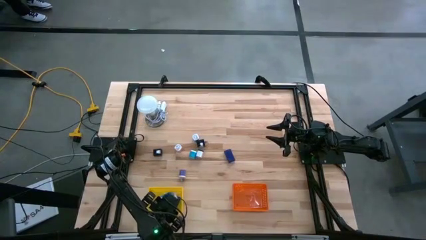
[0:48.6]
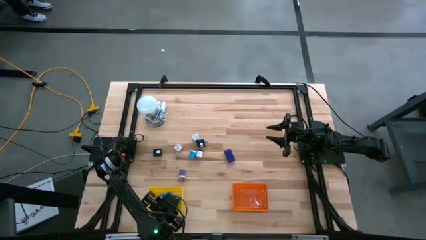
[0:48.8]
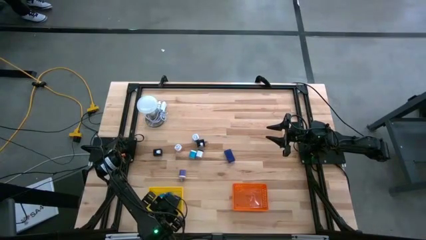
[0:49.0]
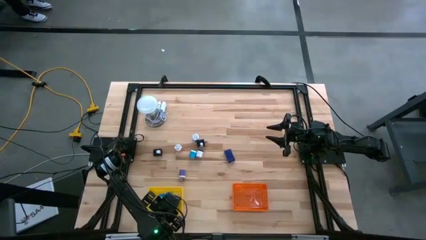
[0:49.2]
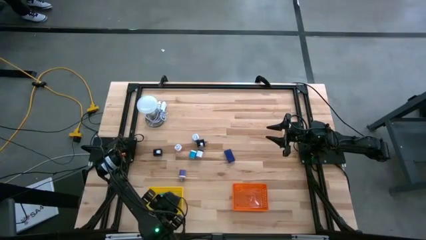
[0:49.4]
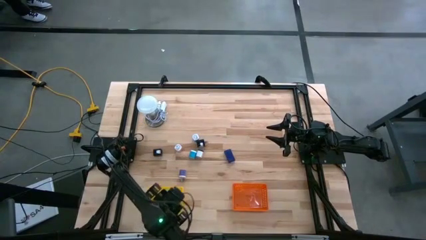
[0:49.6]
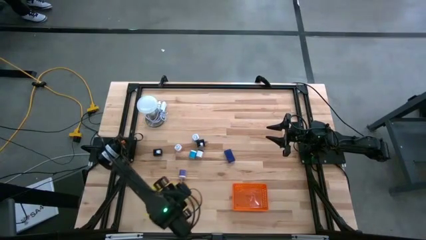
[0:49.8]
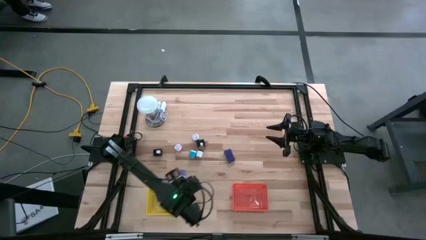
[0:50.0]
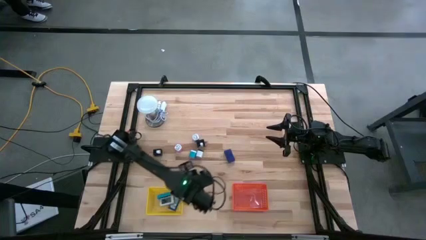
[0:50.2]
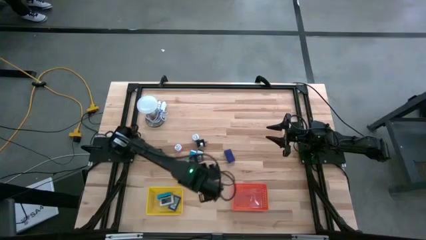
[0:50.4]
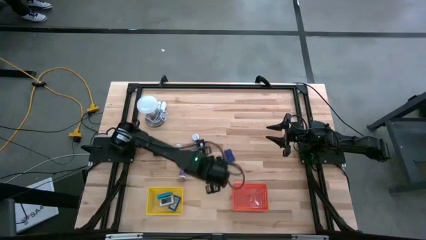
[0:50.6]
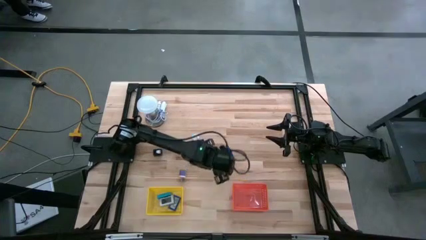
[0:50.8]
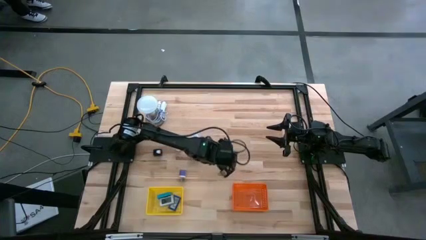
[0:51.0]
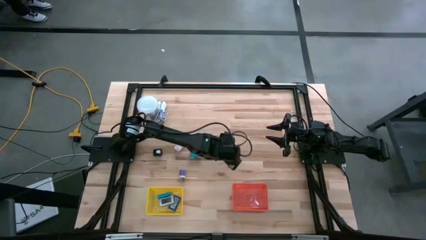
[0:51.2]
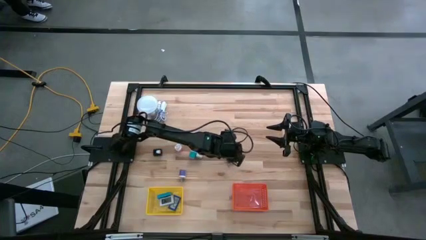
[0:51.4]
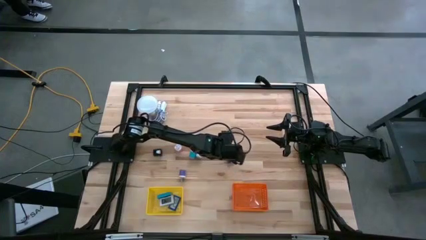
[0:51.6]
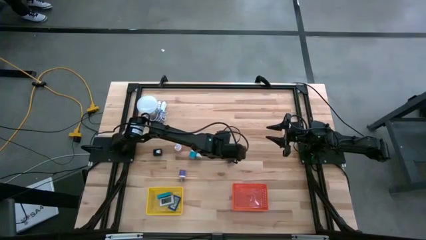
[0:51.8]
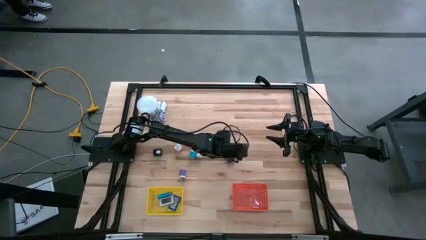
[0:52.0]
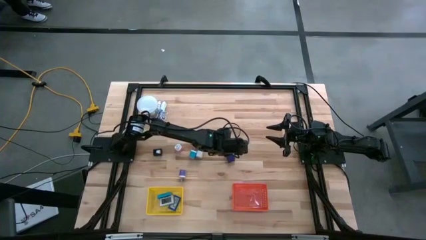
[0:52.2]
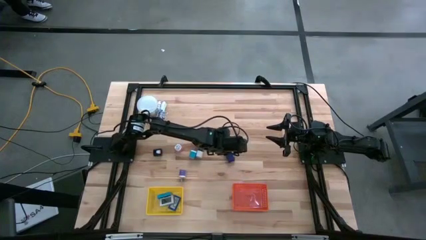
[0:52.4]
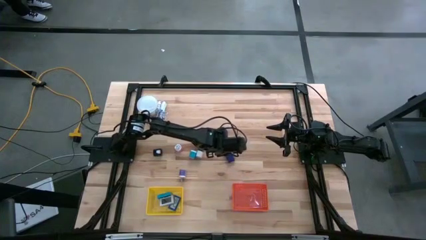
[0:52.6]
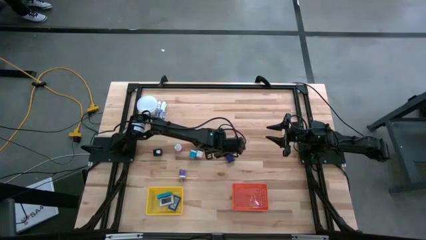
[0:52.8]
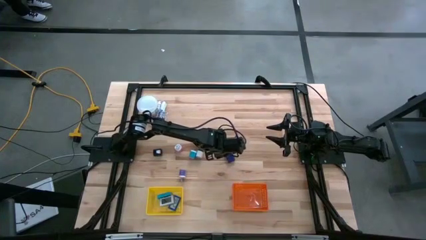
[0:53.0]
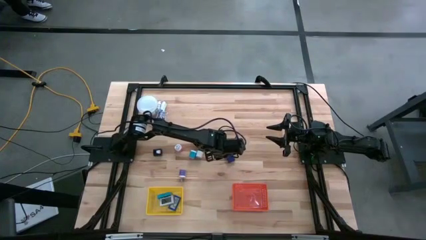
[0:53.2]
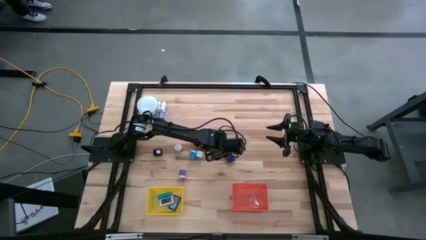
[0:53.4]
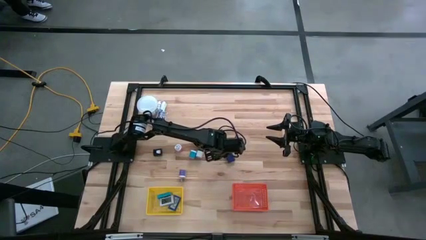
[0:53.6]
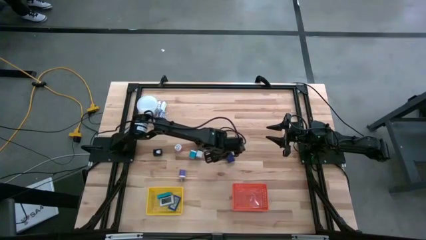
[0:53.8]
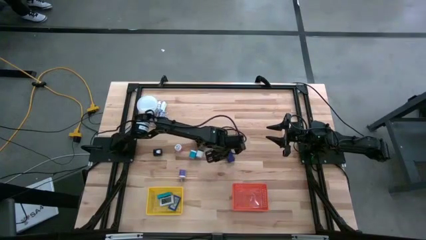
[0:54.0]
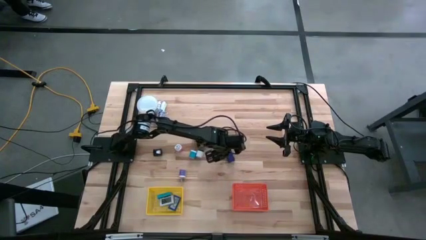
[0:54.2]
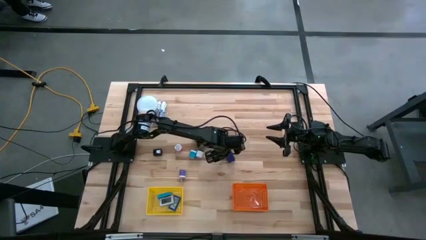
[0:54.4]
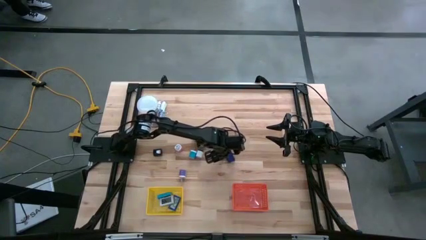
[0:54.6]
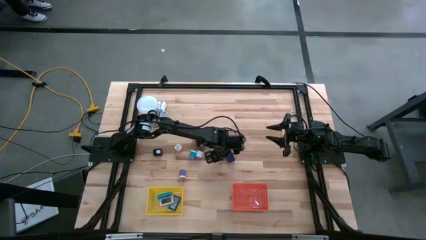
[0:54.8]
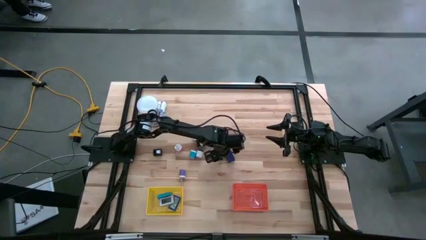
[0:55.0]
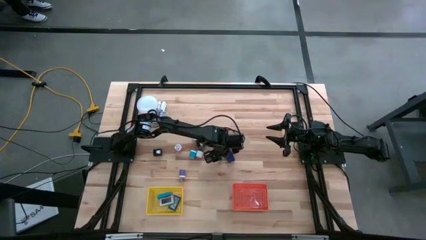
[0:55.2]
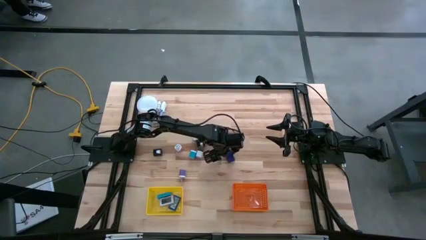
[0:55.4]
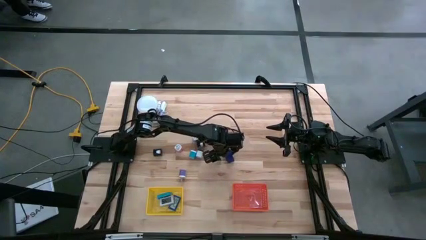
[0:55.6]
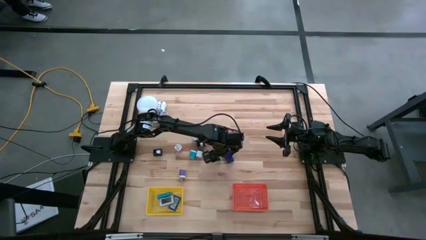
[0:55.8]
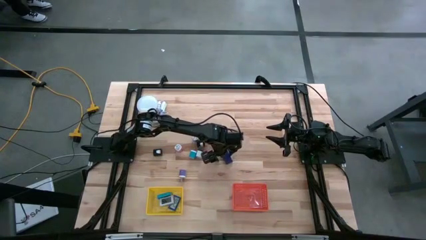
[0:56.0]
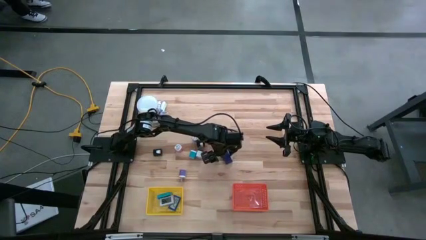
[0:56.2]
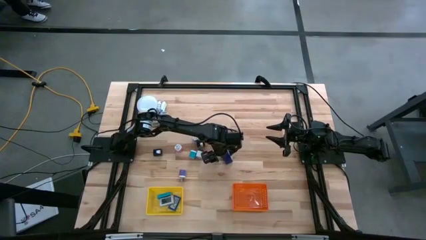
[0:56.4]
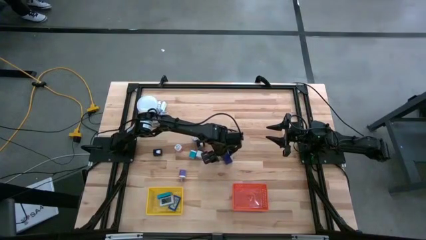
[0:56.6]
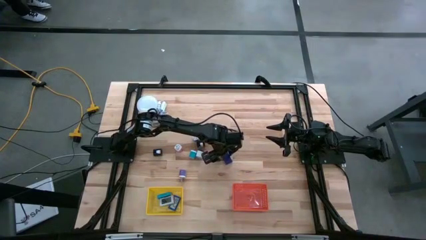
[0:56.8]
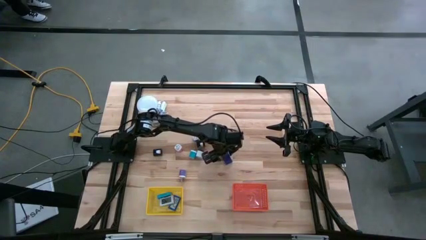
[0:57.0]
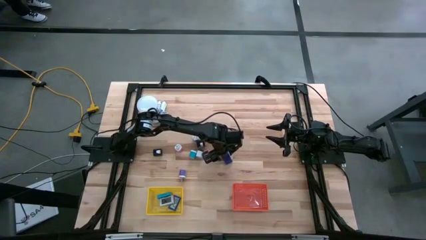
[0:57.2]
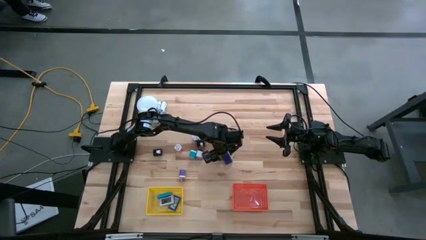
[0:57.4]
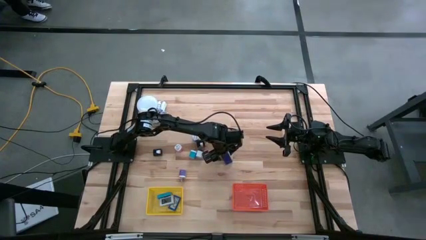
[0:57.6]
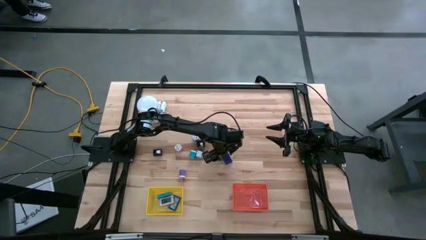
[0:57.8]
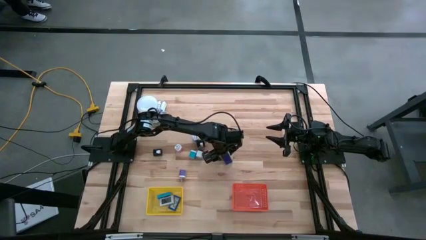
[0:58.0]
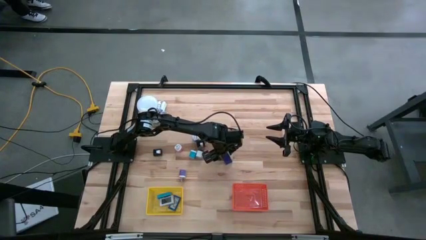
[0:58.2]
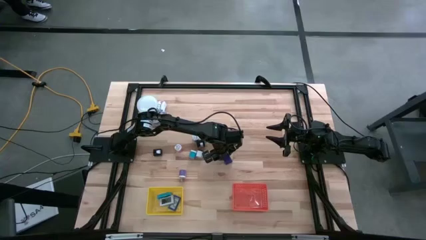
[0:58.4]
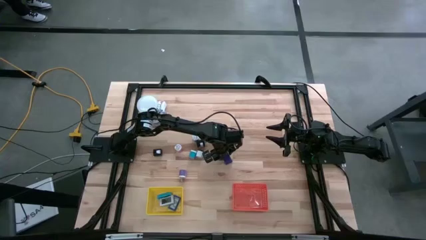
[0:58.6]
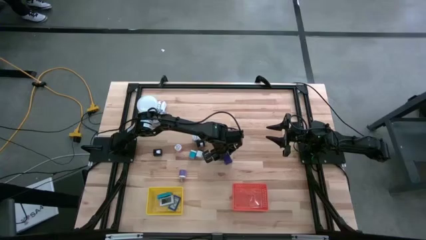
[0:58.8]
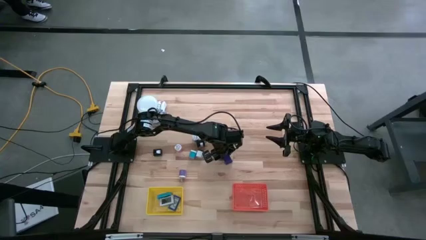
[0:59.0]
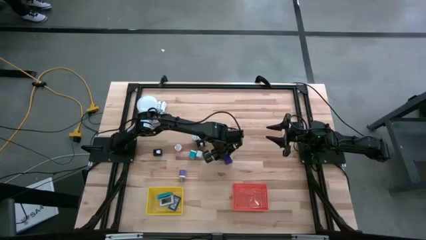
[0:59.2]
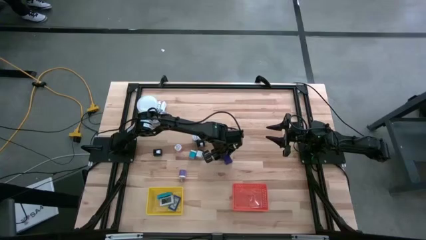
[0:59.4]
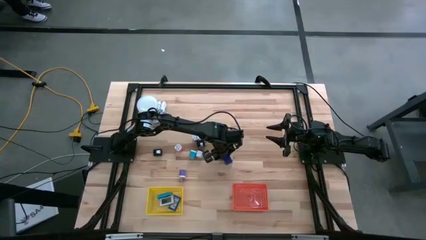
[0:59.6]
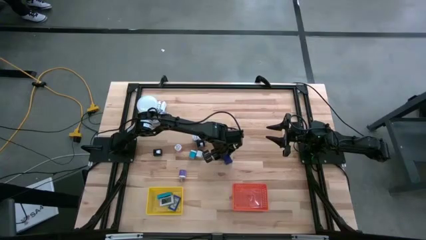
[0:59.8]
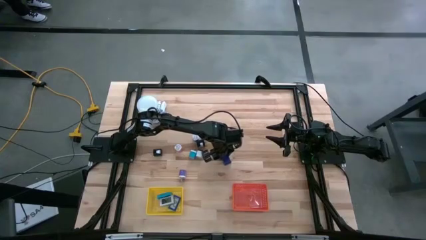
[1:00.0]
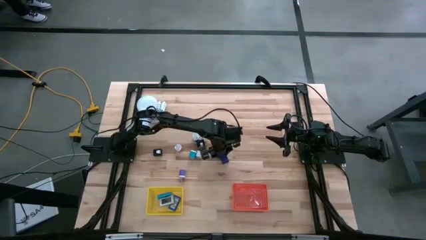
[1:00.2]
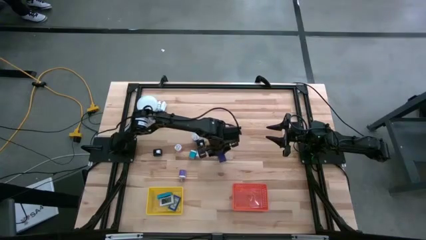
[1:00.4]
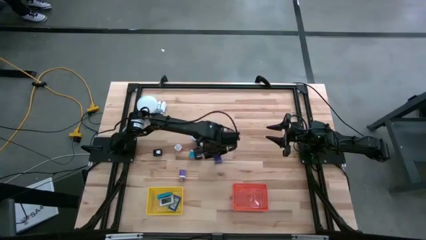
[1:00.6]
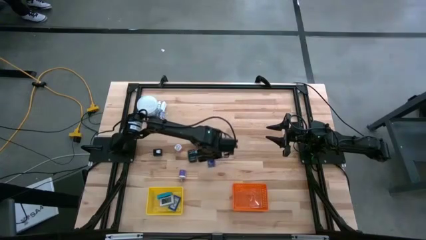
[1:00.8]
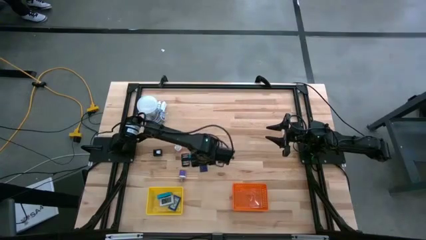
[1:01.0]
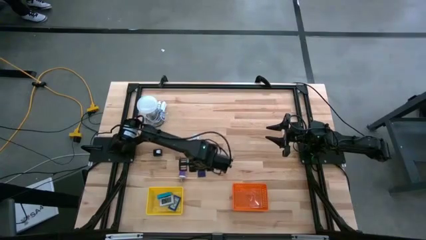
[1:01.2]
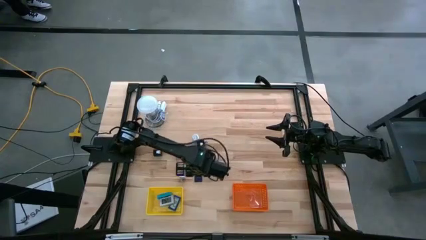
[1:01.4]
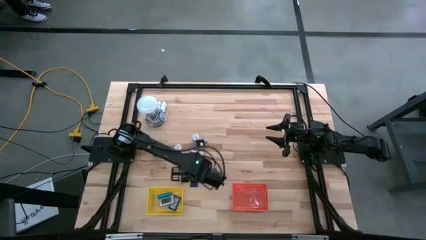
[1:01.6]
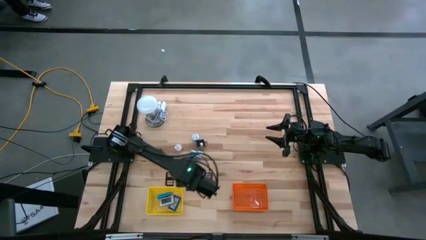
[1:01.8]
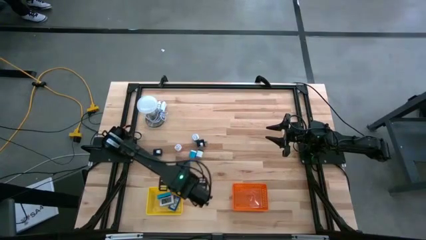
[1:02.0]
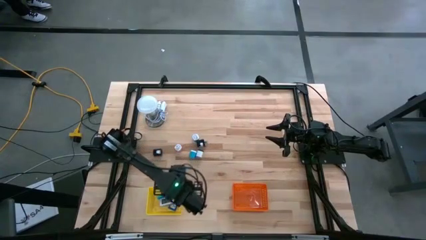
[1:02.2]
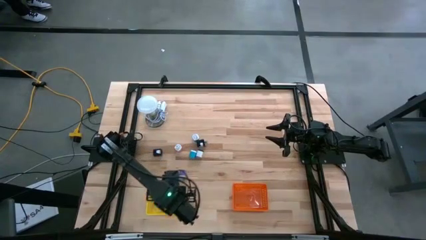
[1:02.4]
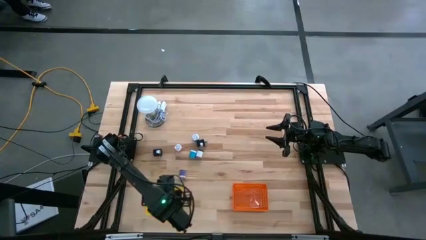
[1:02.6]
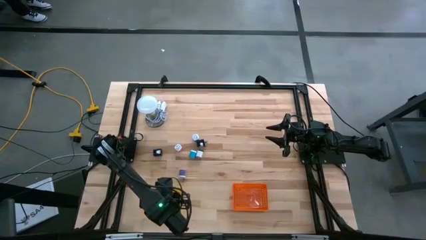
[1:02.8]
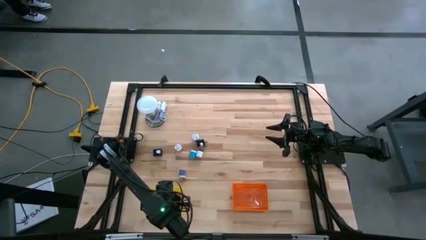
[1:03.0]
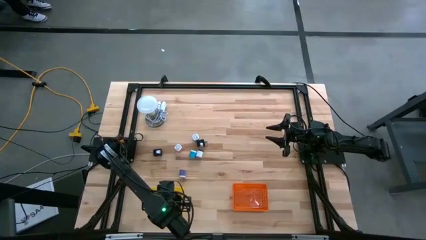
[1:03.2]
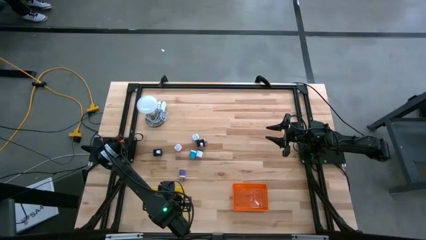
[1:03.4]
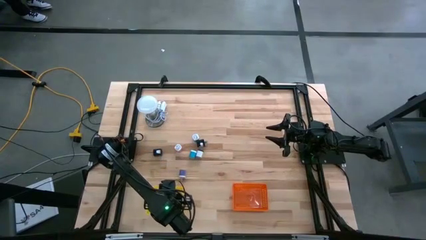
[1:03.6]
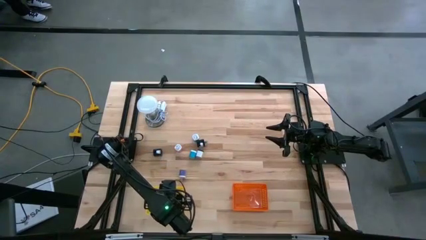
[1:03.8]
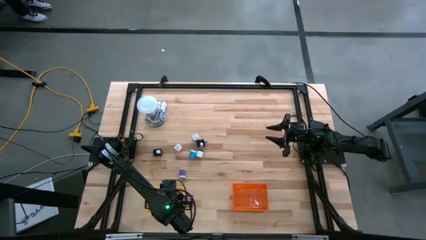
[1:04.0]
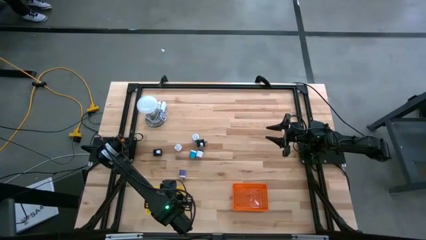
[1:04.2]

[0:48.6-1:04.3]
Task: Pick & Place Office items
Put the dark blue digital clock into the yellow bin
